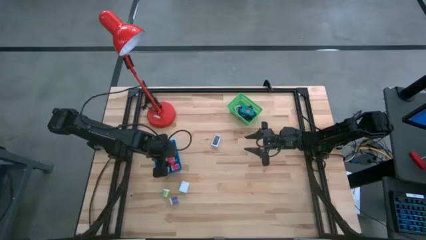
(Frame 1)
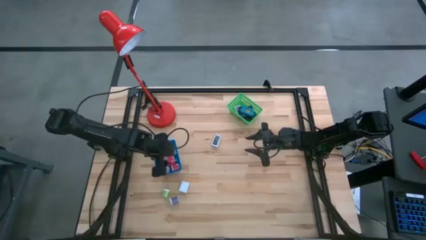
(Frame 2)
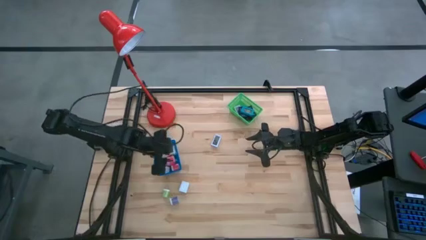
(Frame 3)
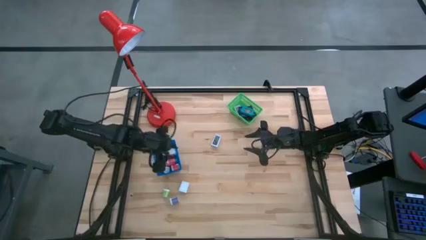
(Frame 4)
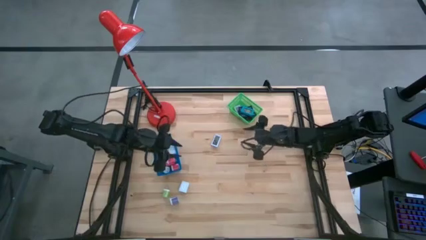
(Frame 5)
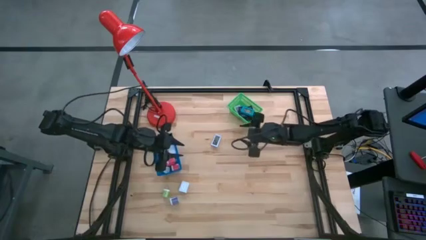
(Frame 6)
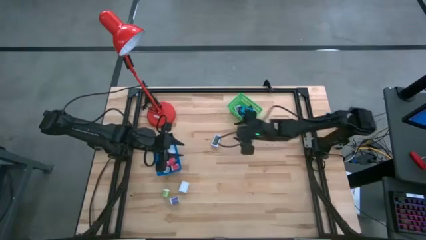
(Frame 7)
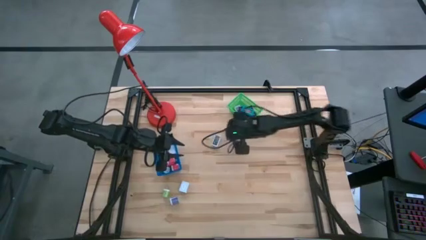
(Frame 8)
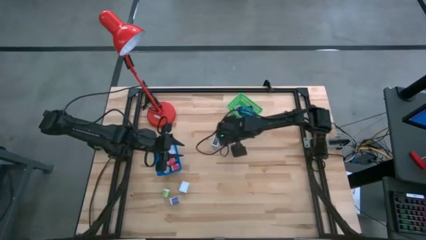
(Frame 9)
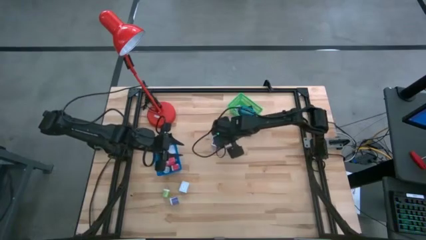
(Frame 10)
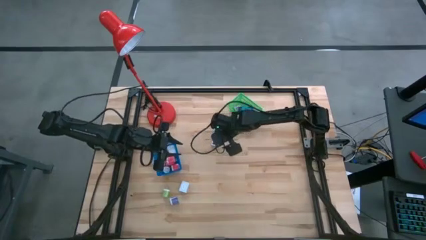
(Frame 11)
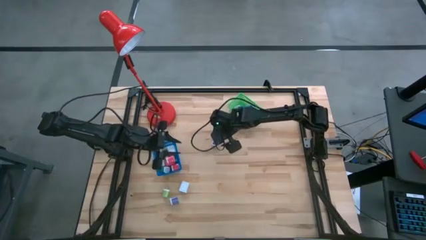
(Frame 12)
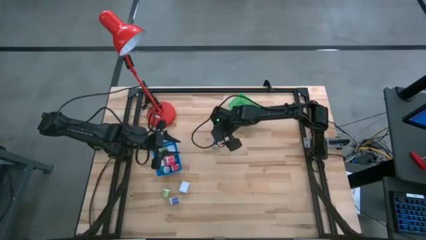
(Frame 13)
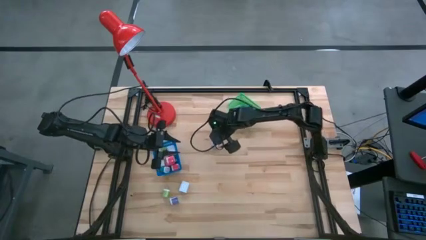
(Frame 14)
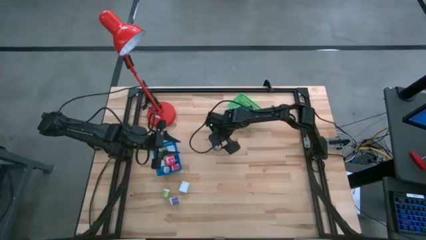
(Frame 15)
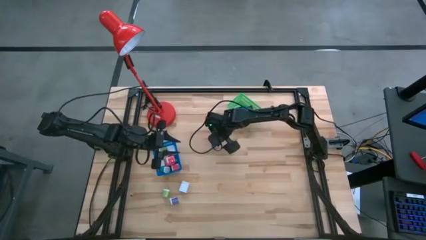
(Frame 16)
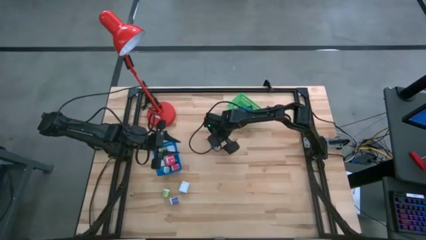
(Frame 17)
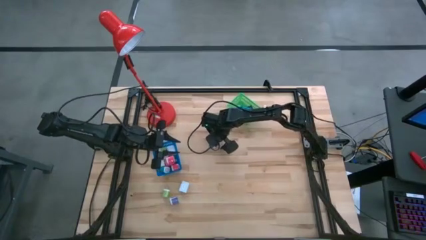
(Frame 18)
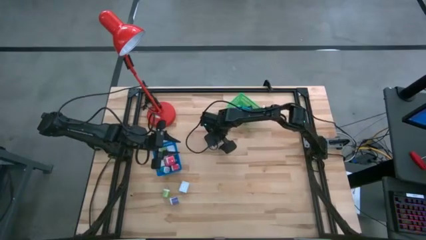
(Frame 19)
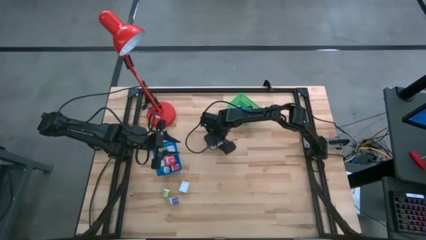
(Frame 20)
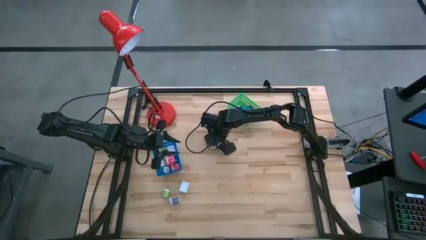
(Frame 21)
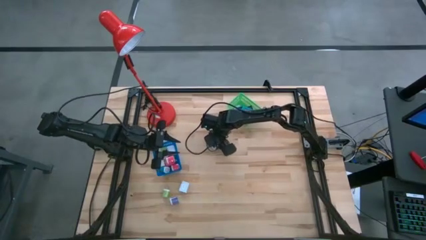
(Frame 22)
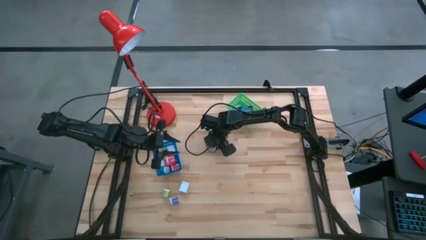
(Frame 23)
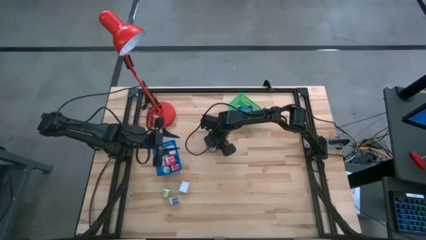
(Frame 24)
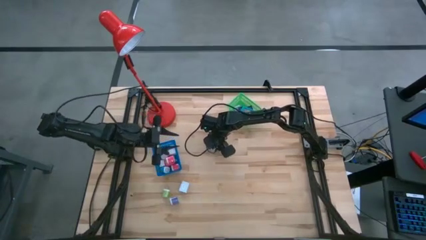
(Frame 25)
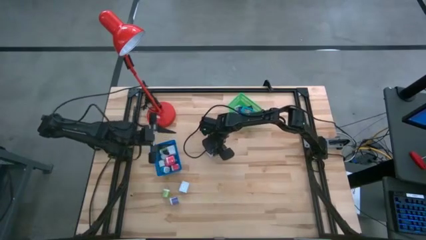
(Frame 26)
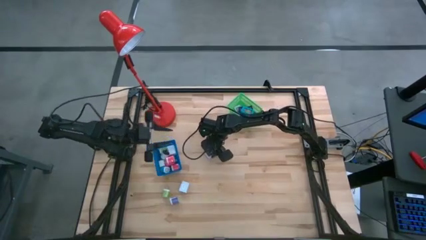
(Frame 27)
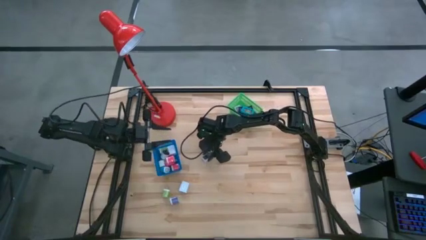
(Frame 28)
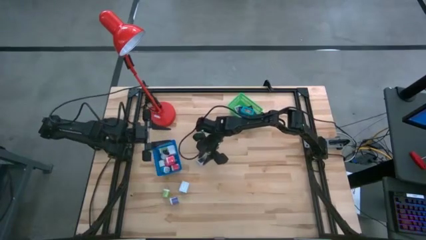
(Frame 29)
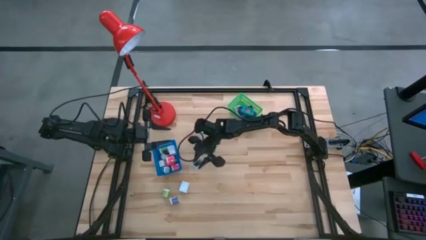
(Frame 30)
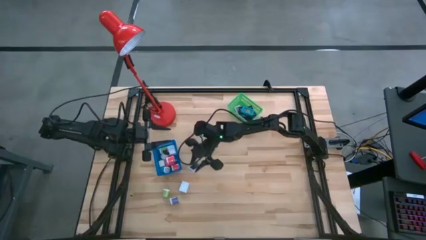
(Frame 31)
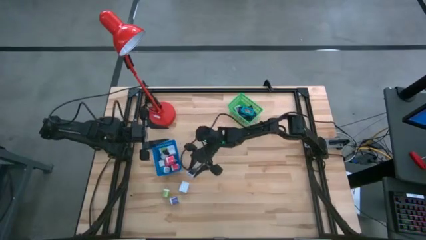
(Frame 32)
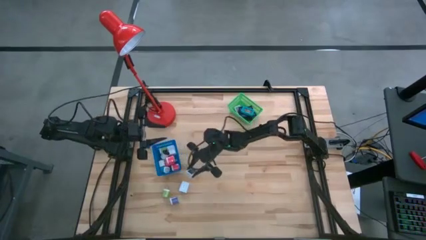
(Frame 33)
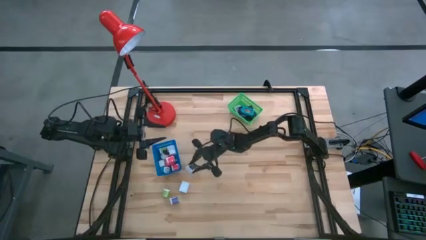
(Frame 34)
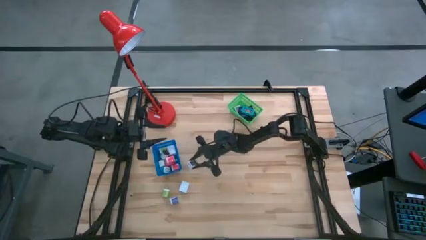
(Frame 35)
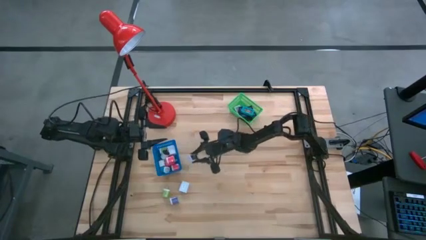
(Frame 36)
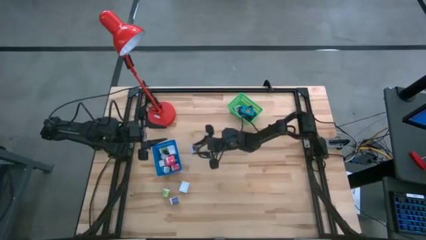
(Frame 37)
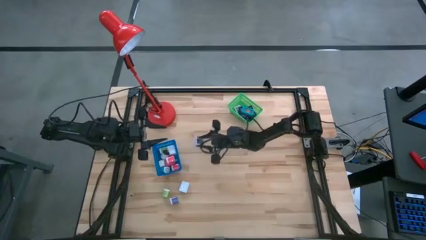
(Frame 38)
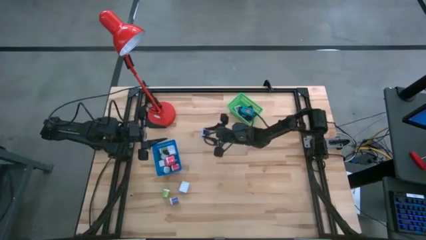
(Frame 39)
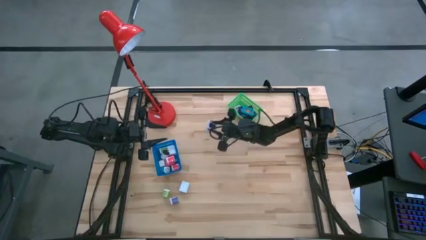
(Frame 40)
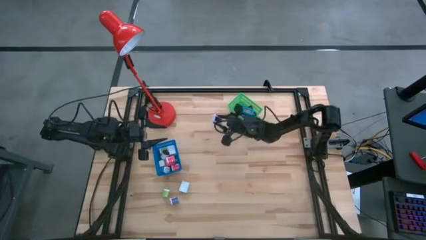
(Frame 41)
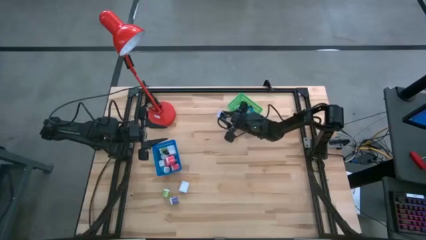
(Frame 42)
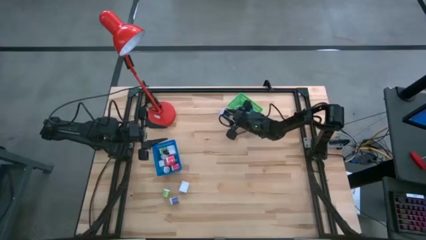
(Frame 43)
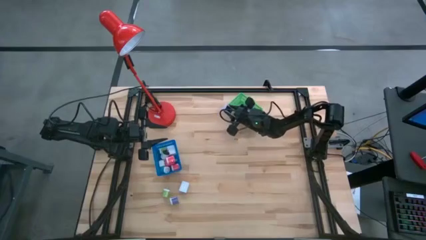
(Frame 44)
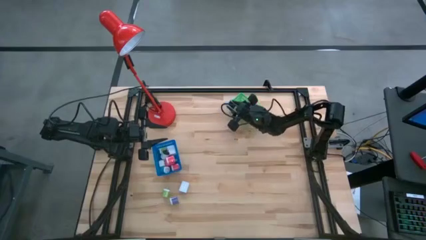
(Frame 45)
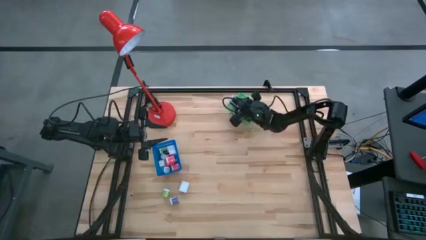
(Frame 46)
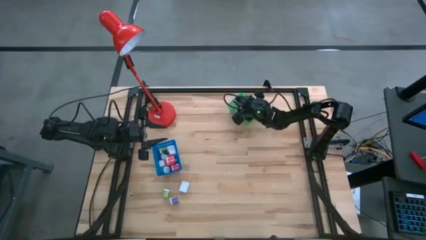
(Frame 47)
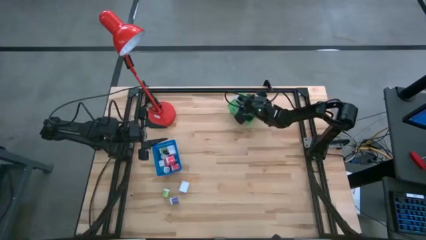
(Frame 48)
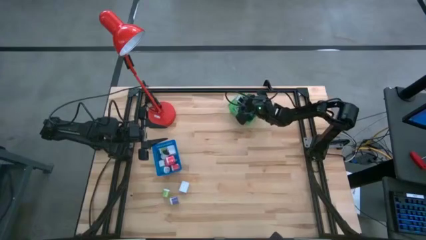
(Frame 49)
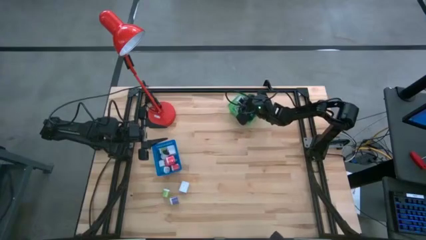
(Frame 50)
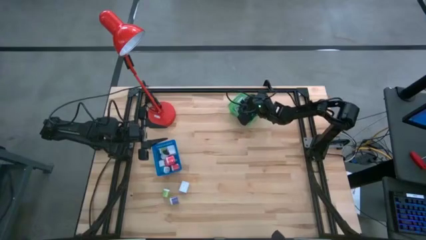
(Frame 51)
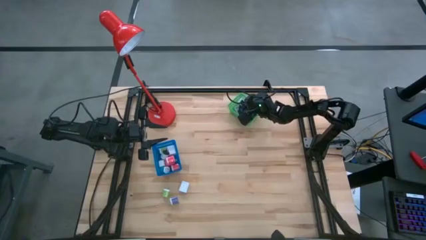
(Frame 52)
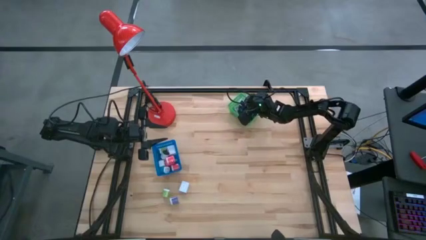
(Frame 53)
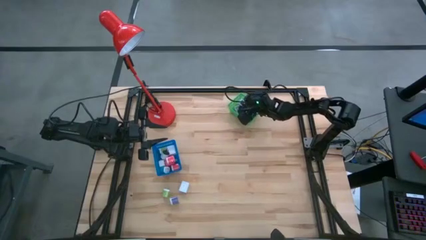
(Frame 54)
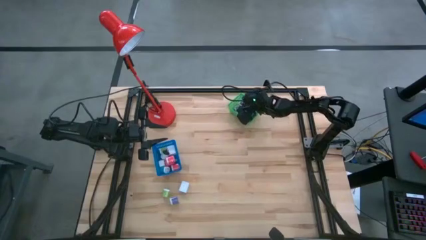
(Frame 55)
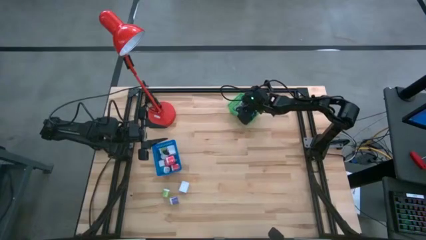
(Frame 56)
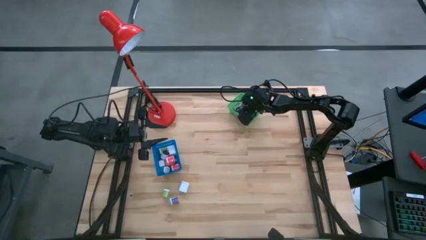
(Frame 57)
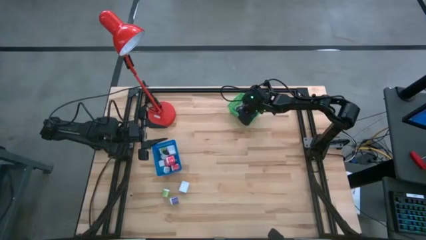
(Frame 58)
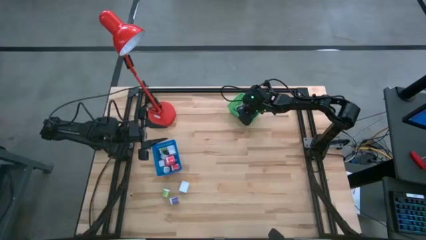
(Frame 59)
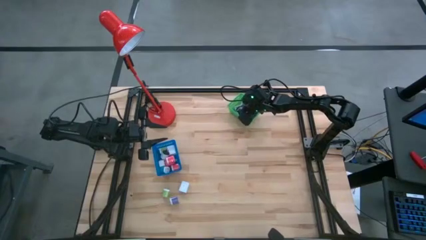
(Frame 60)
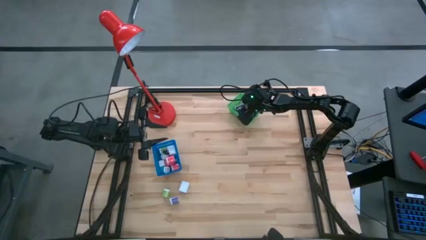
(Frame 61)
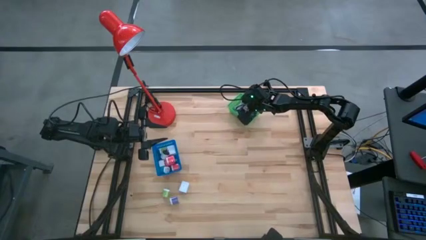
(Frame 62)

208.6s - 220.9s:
Task: Pick & Place Office items
Put the white digital clock into the green basket
